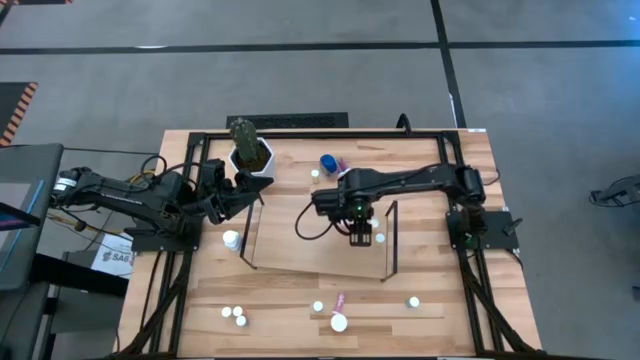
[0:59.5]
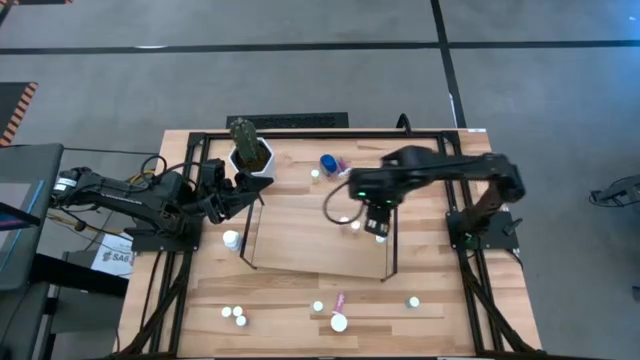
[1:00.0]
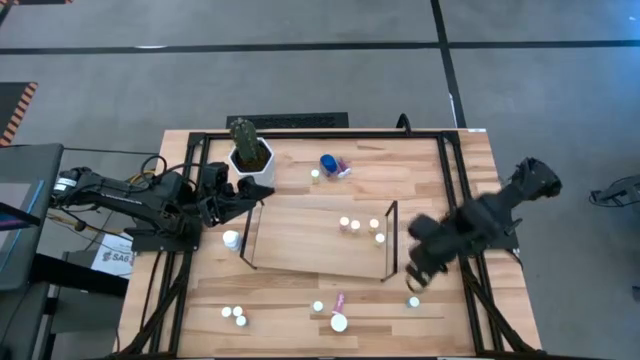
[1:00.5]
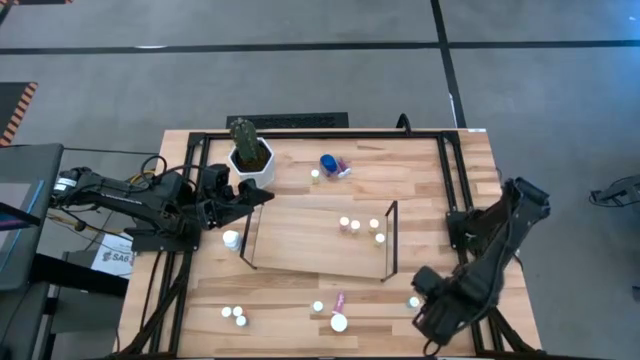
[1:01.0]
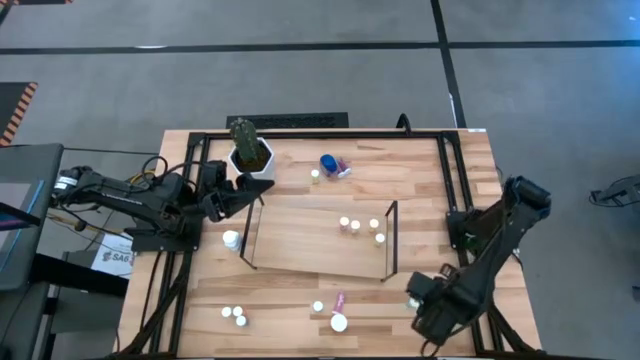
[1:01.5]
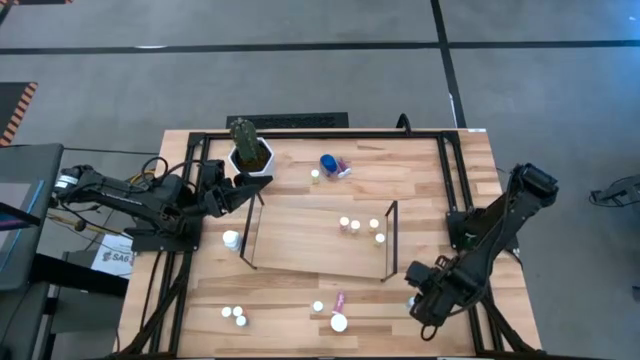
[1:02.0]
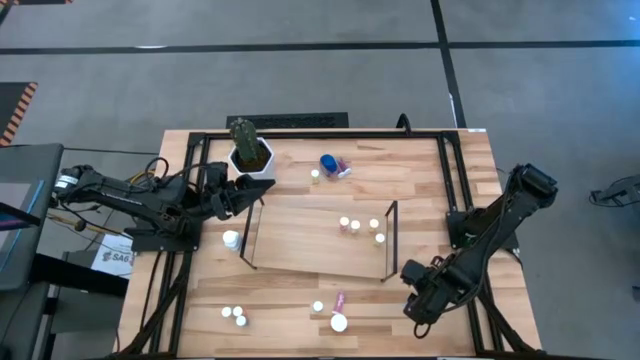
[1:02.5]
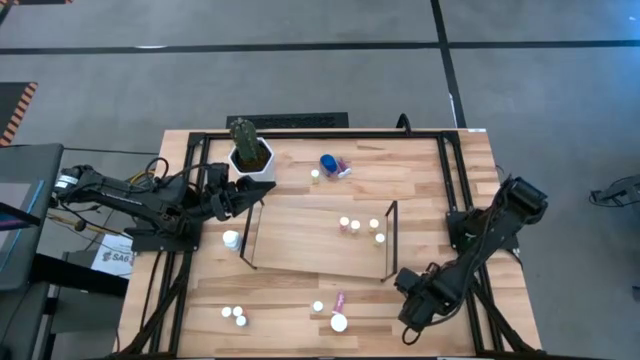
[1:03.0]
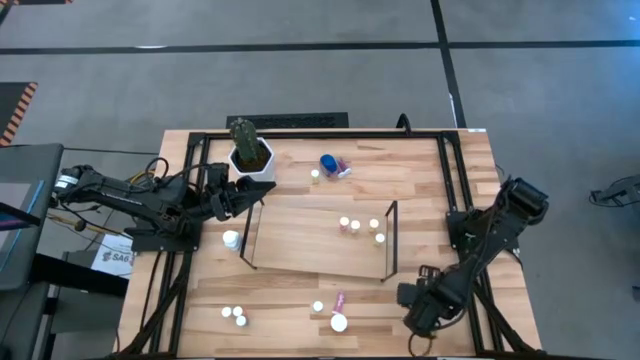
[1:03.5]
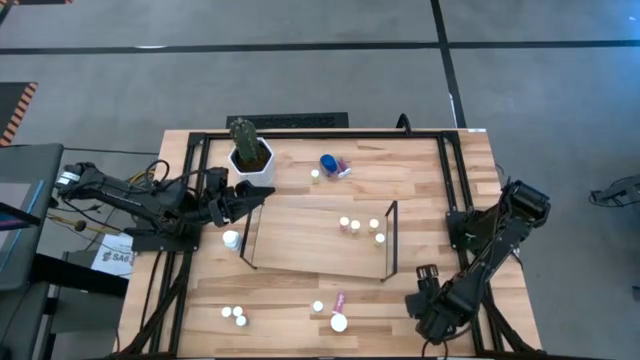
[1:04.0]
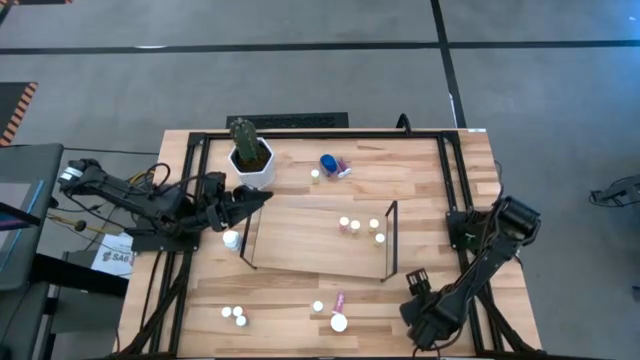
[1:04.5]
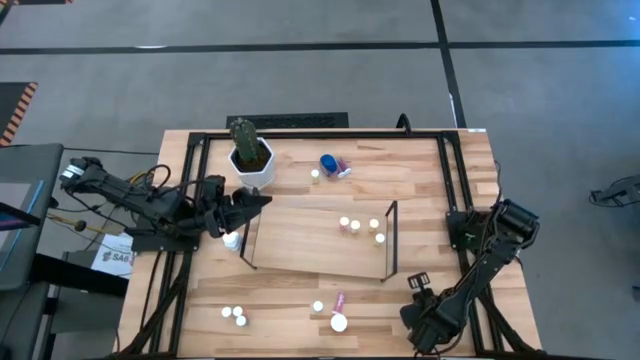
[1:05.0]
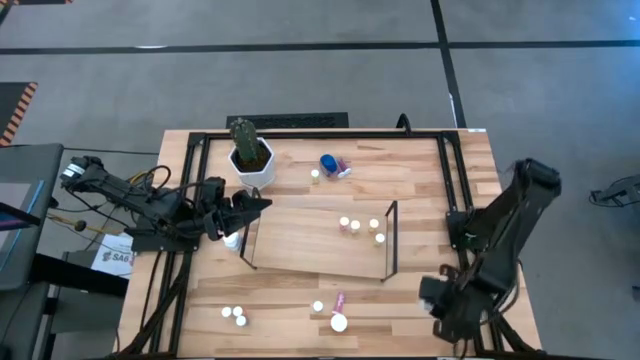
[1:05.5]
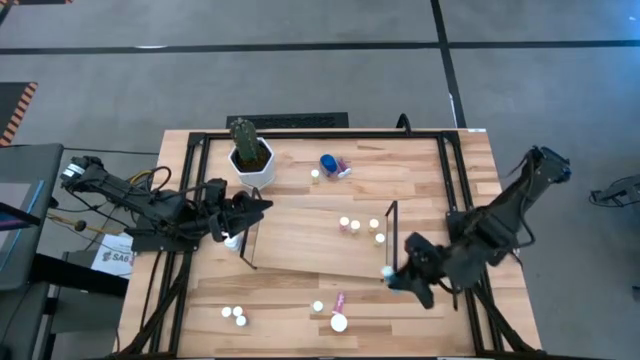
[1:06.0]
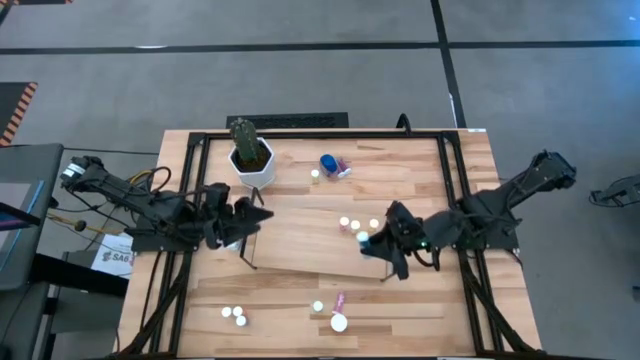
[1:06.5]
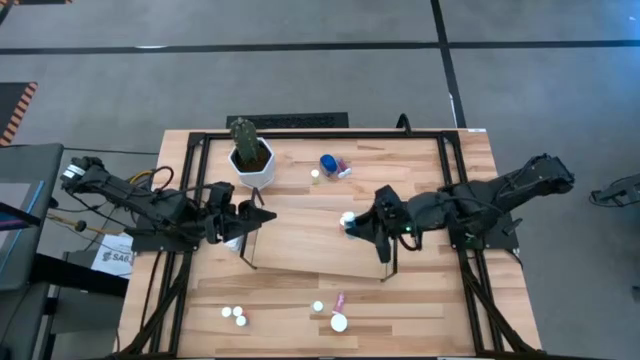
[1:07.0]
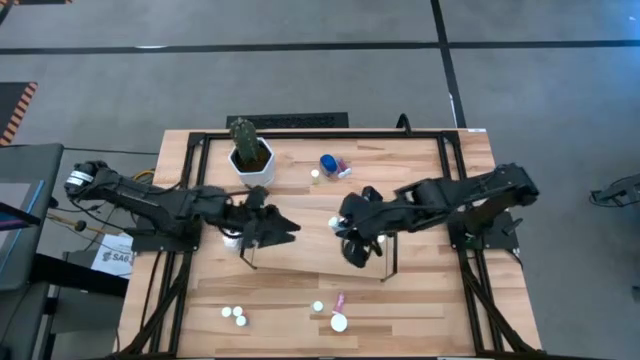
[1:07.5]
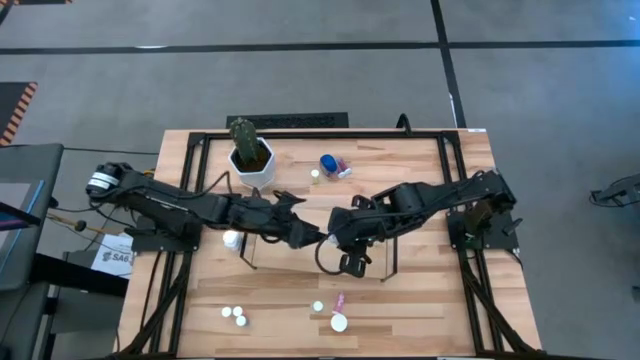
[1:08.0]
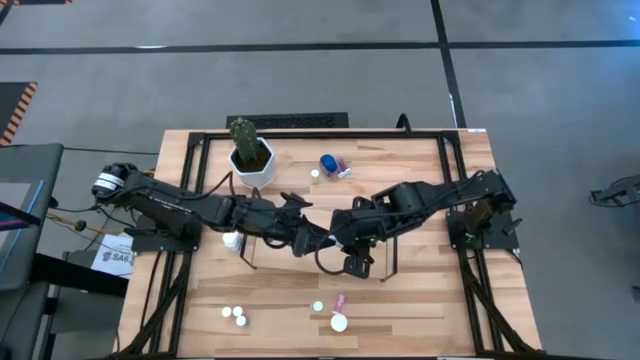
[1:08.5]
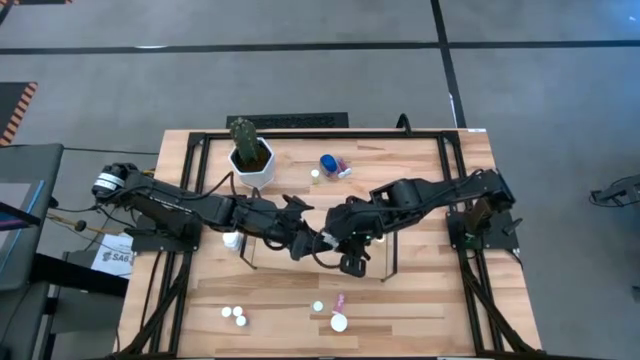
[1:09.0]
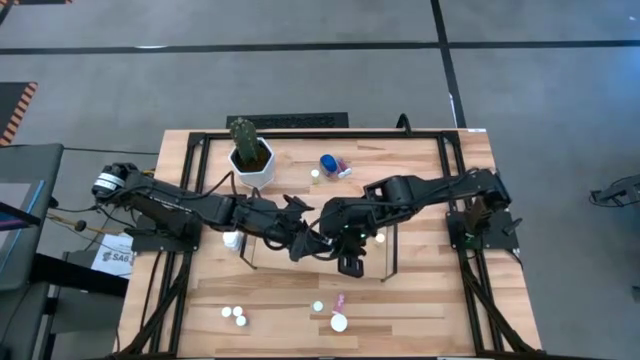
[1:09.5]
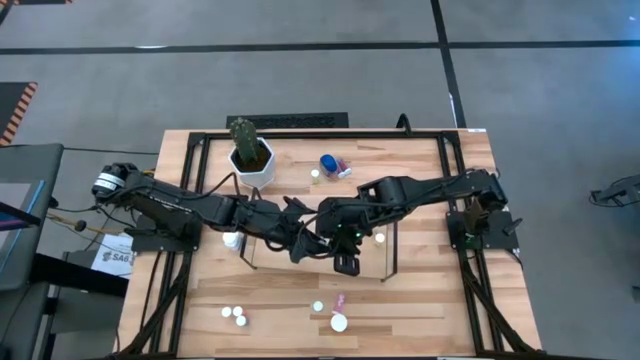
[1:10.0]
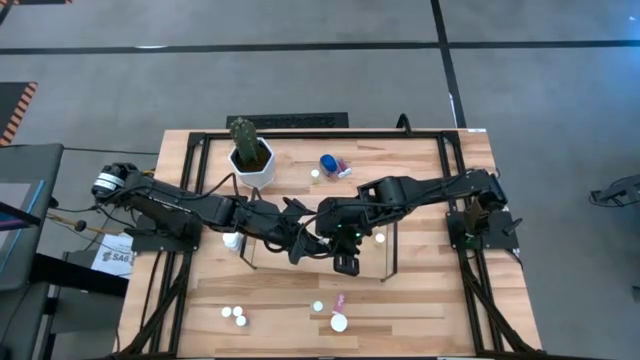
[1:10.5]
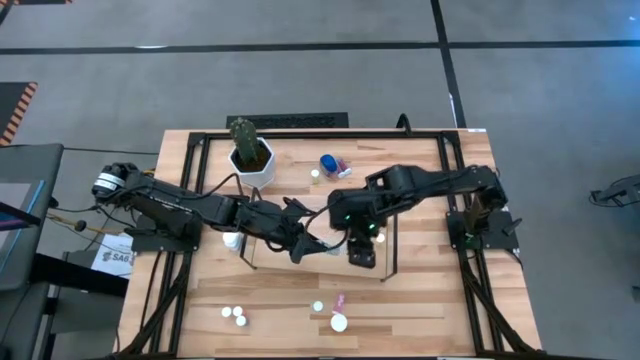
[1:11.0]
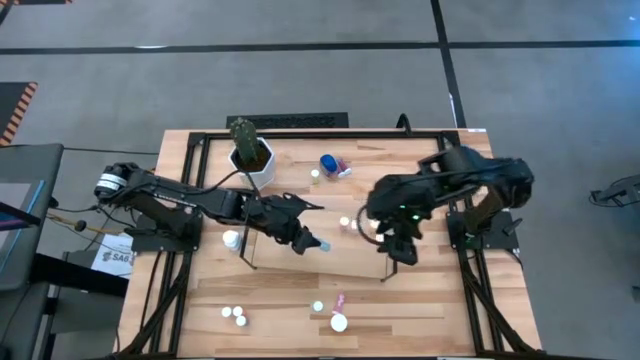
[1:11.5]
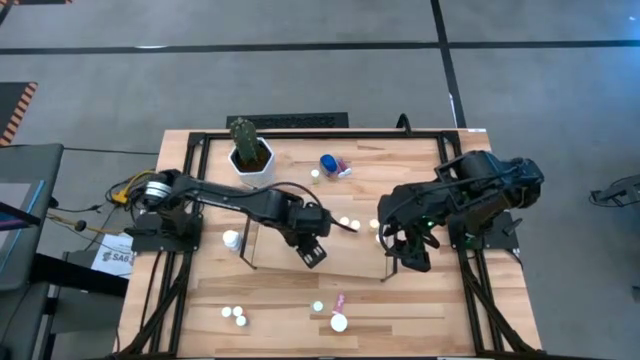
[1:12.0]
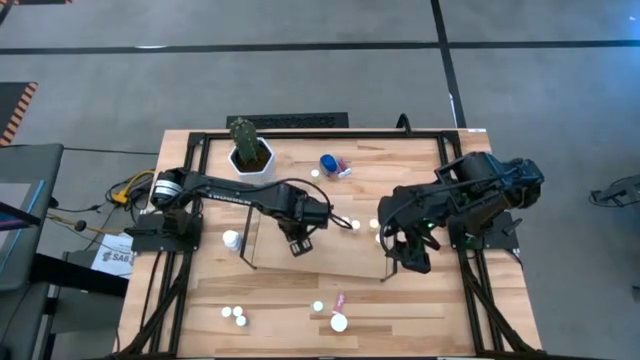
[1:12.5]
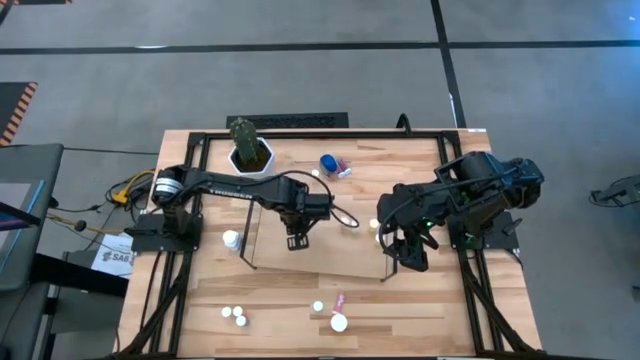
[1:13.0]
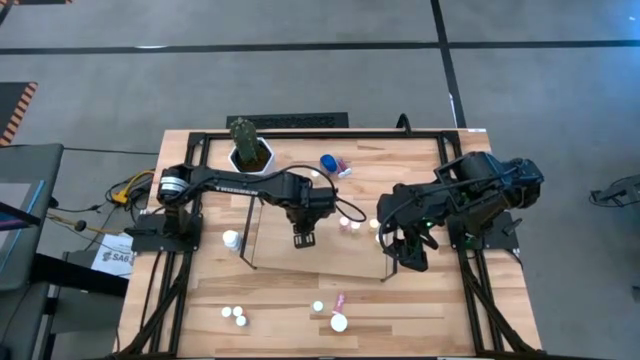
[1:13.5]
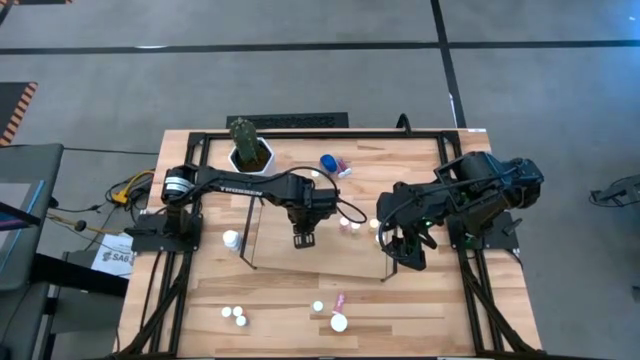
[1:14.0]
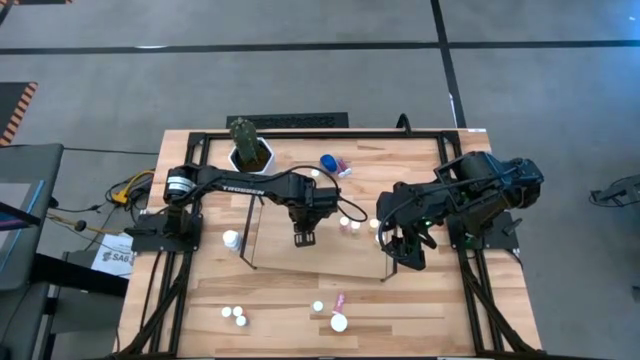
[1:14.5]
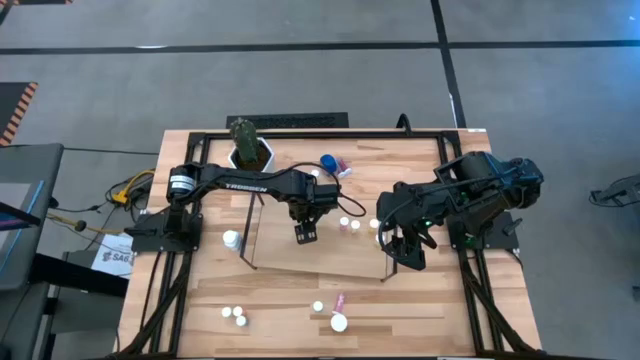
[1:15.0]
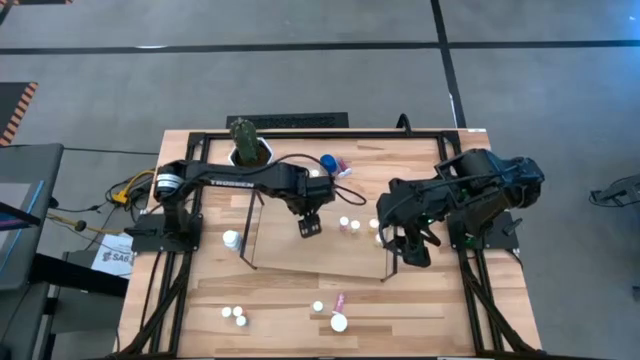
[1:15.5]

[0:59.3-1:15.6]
Task: Pick and place medicine bottles onto shelf by color
Put the blue pill bottle on the shelf

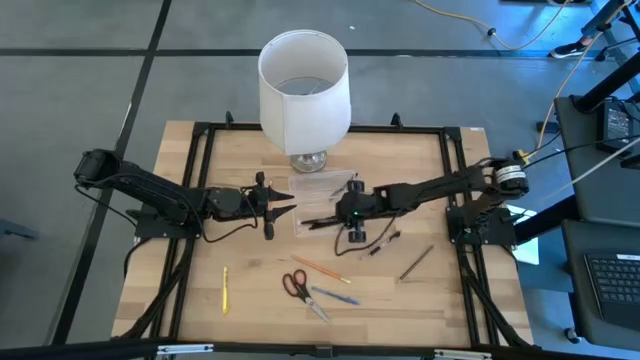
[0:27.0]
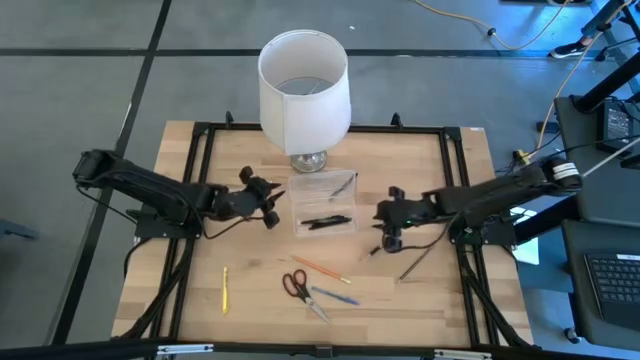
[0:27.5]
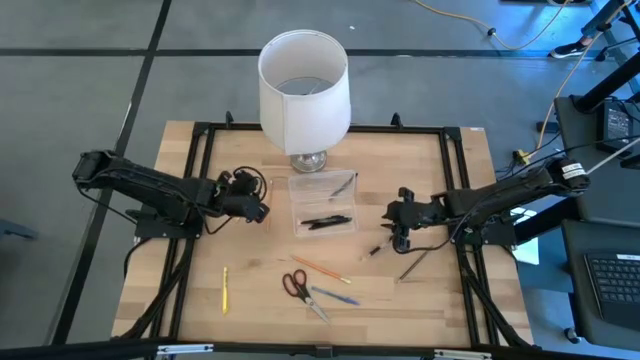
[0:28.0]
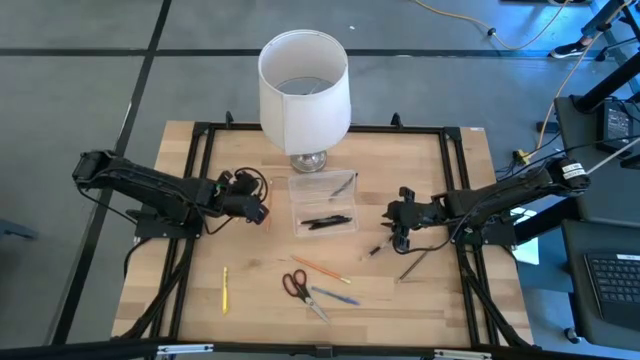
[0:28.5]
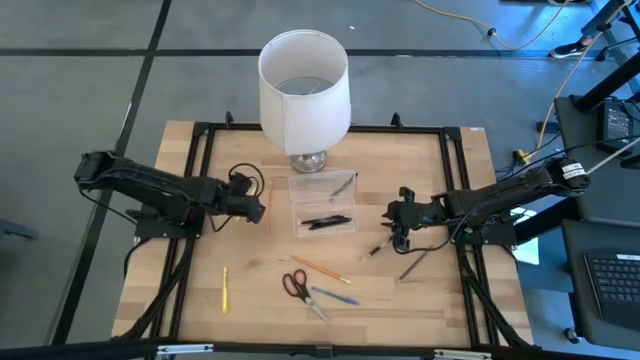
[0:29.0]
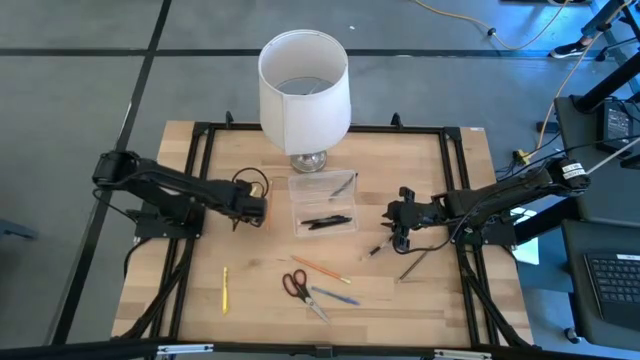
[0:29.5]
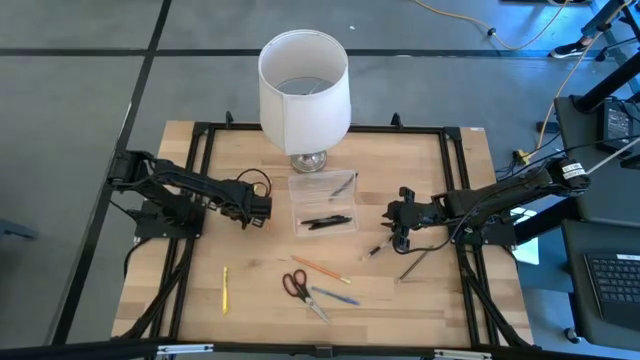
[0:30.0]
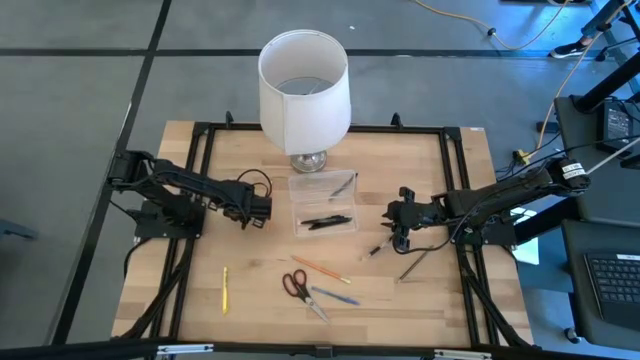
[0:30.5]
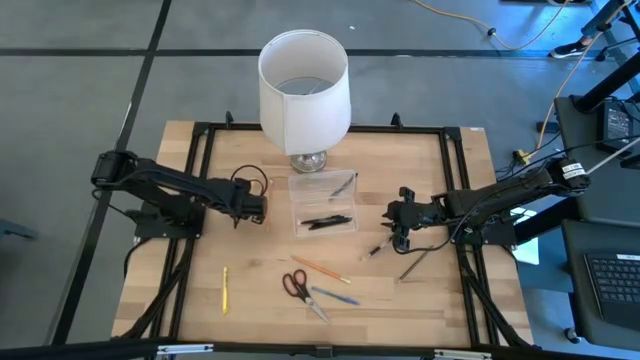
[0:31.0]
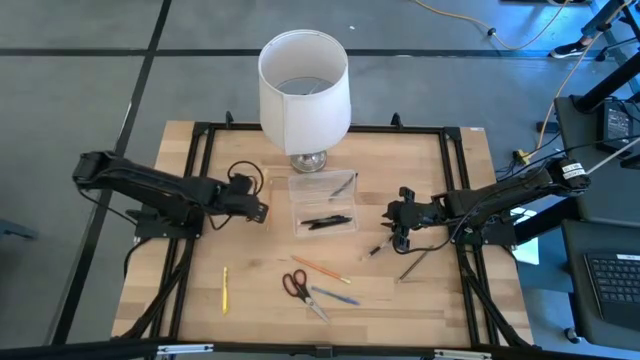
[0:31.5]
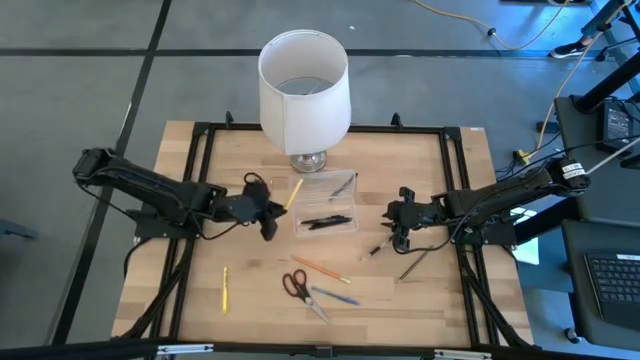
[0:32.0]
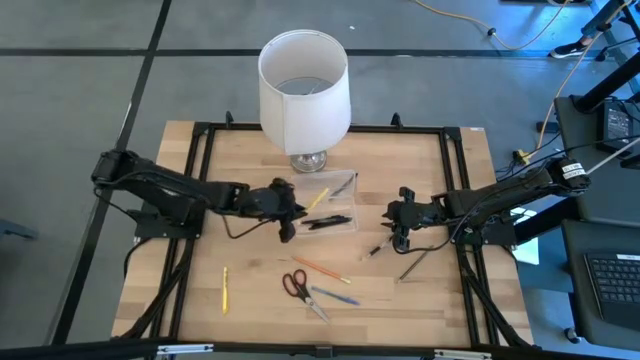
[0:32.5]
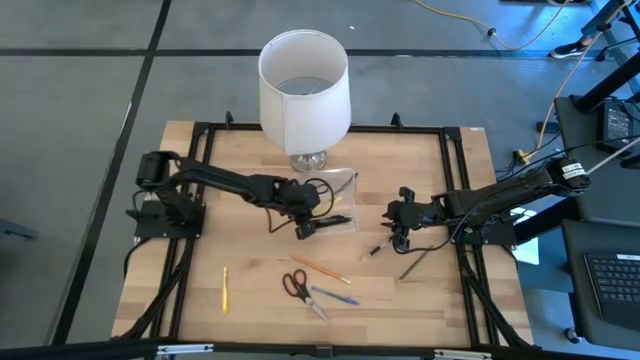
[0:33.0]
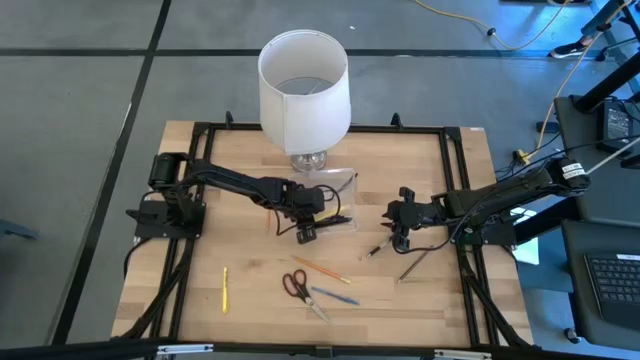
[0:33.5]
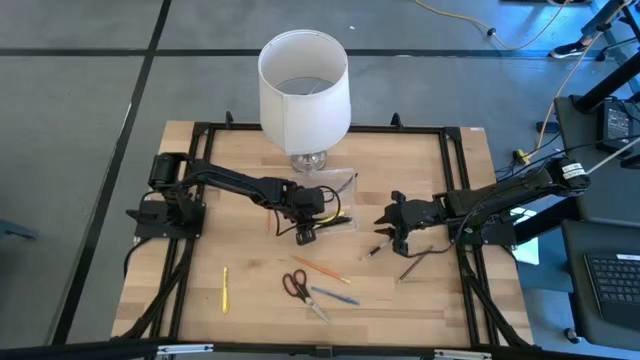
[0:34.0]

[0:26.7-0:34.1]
Task: Pick & place school supplies into a supply box
Put the yellow pen into the transparent supply box
